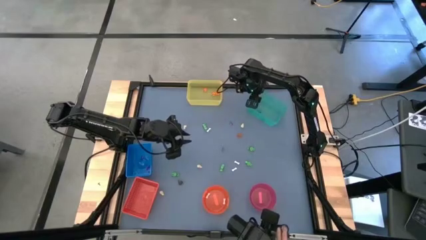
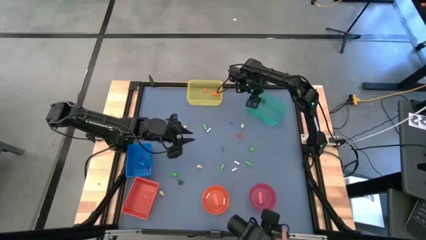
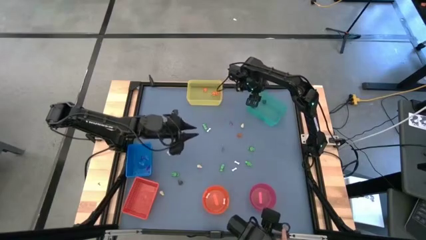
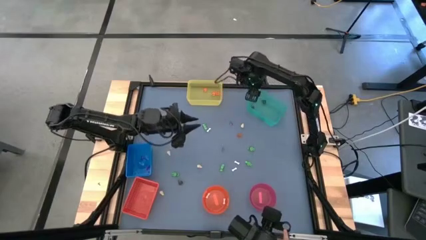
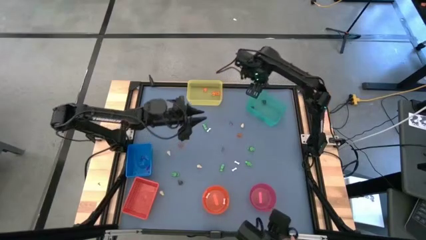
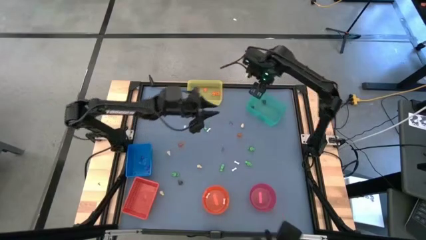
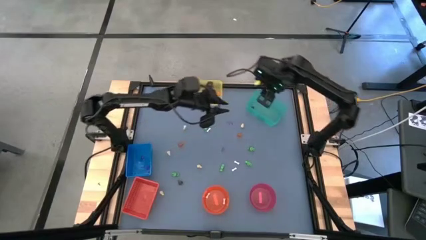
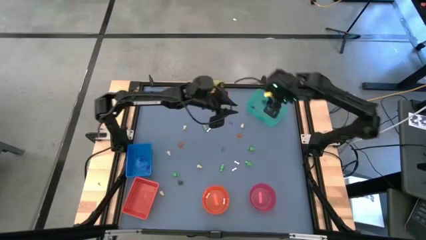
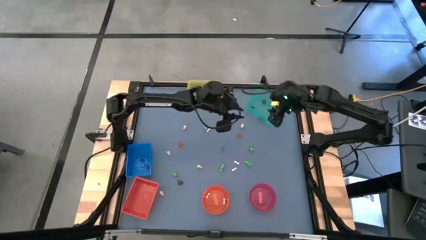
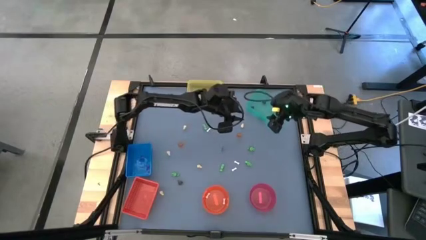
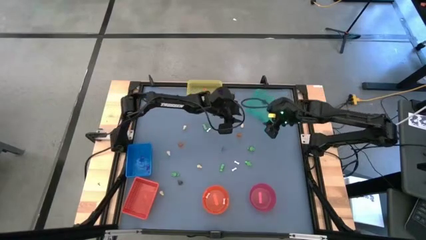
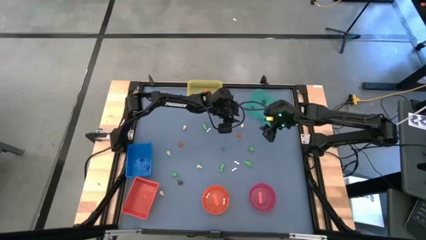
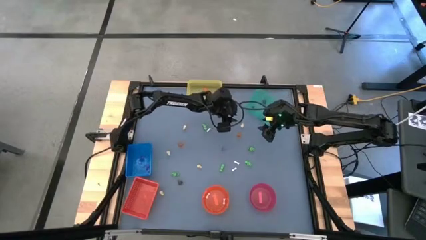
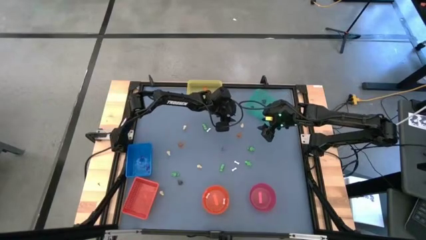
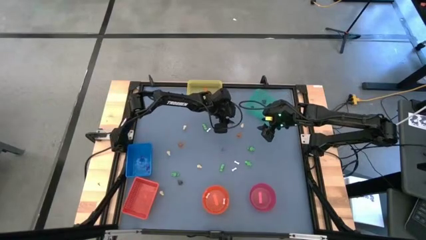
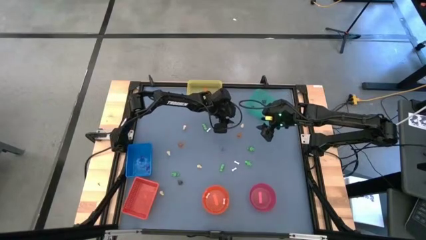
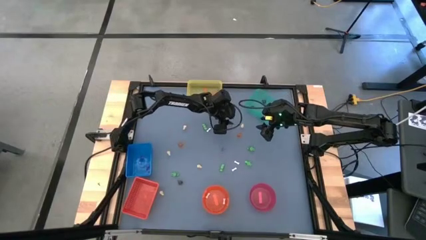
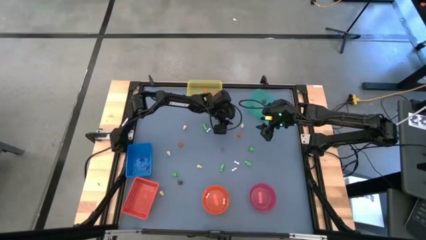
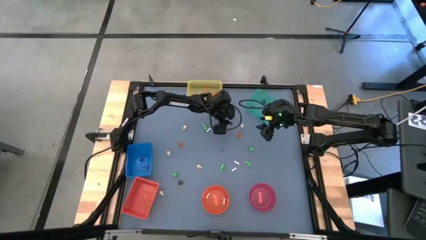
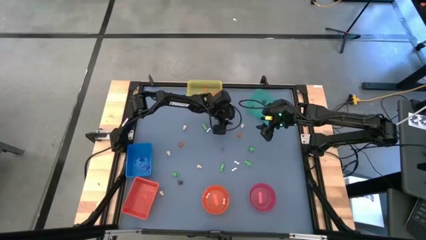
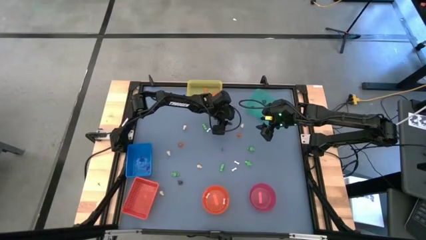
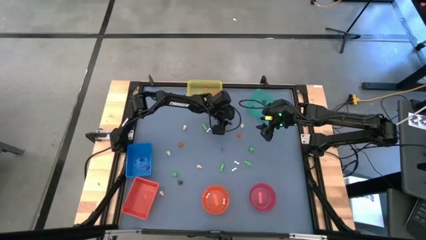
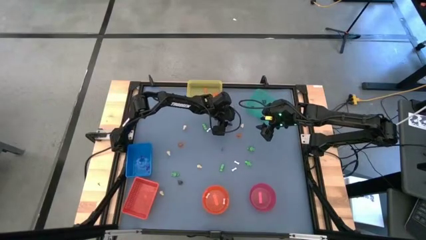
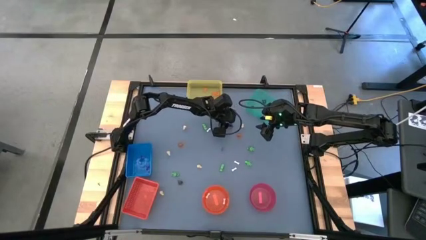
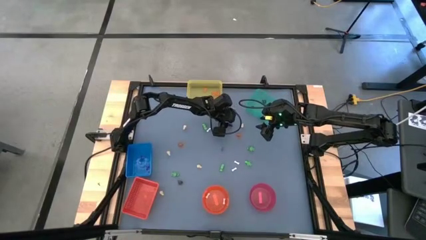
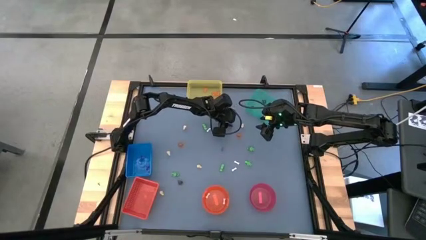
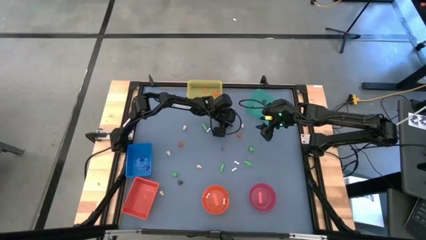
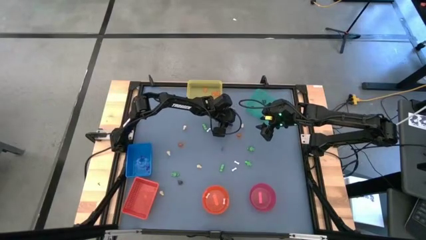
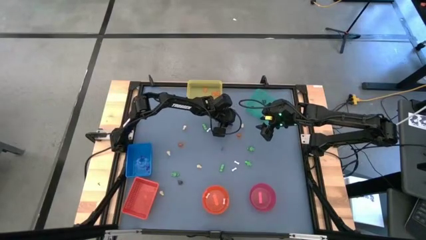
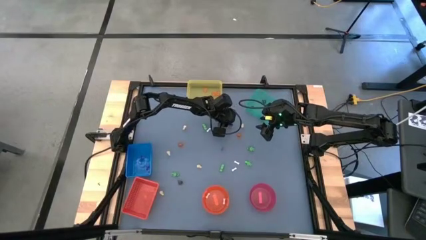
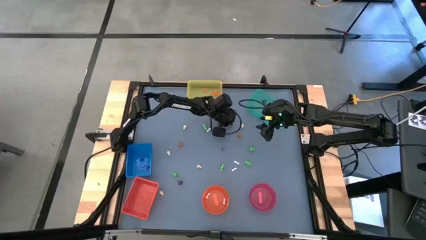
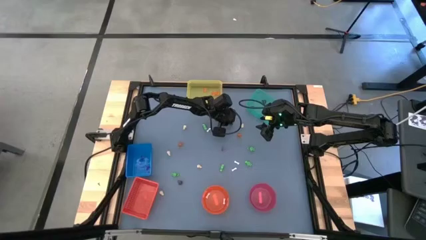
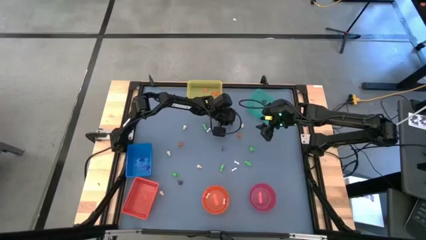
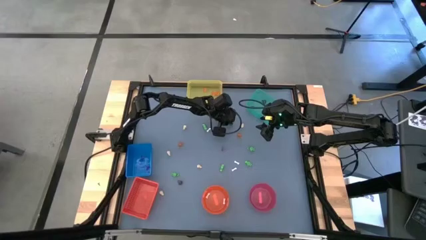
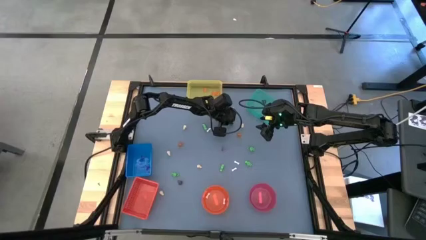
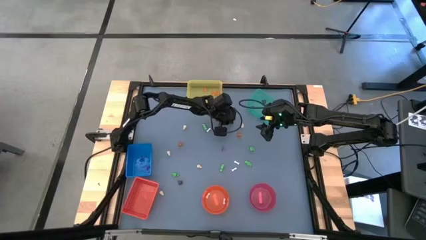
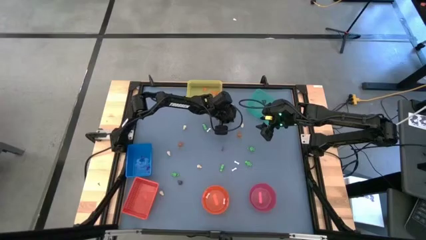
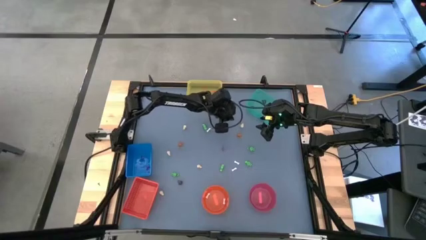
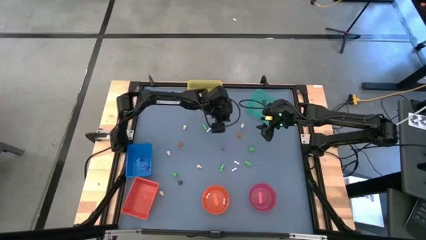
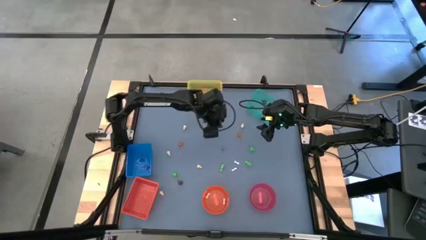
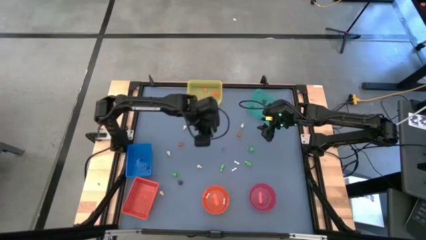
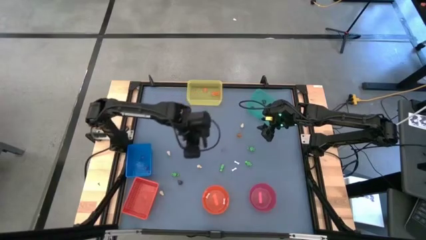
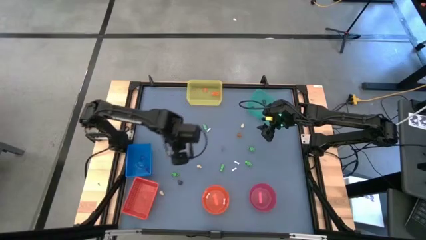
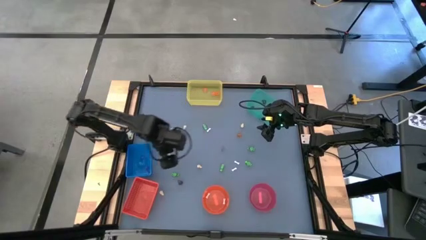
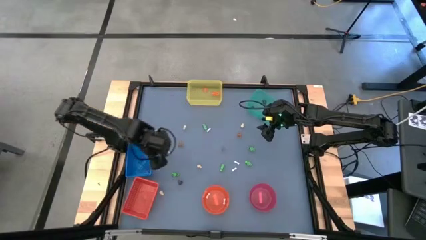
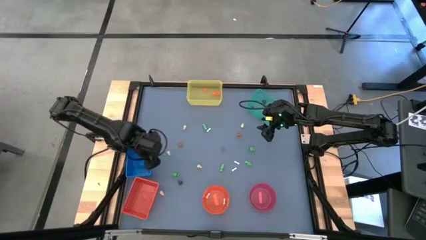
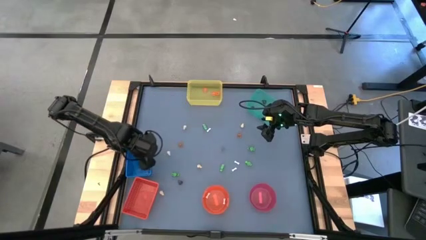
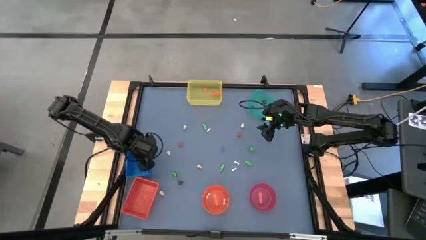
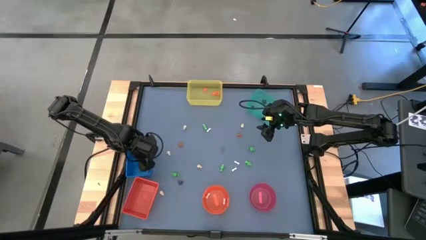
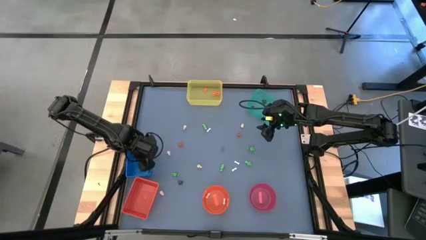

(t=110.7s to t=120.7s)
Task: Sort Halloween decoration
Put the purple witch hat toy into the blue bin

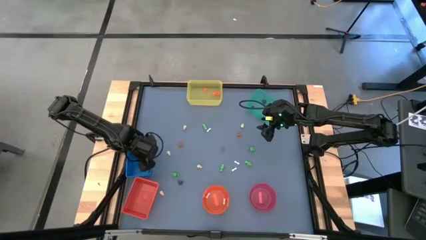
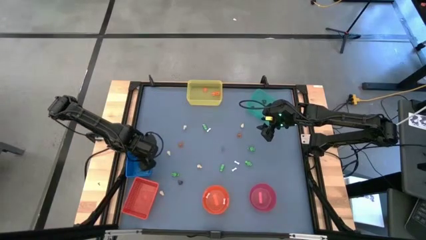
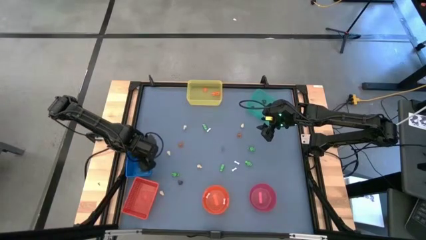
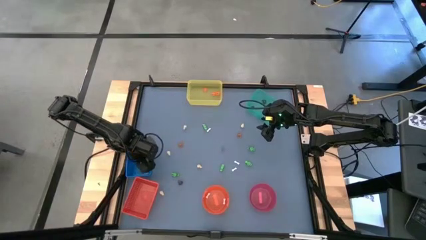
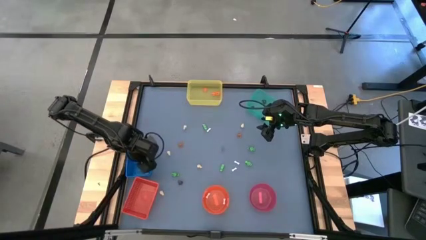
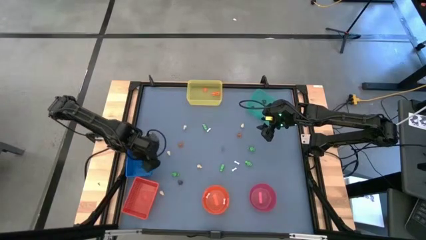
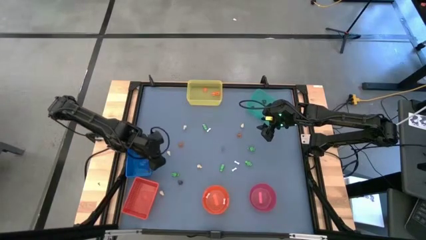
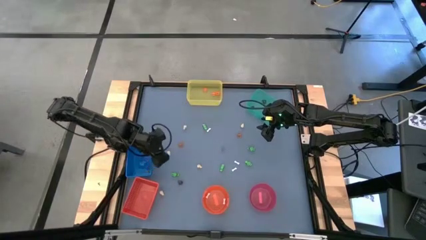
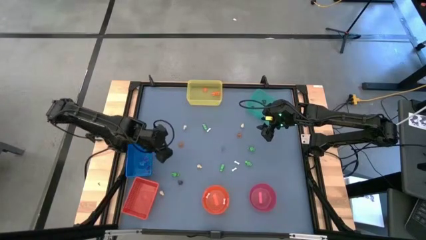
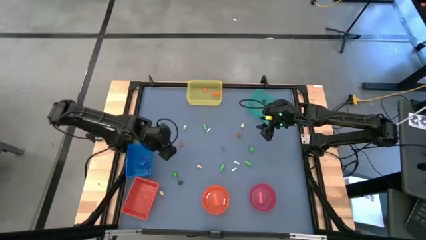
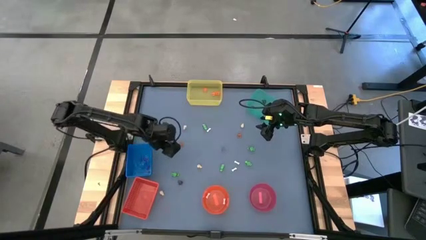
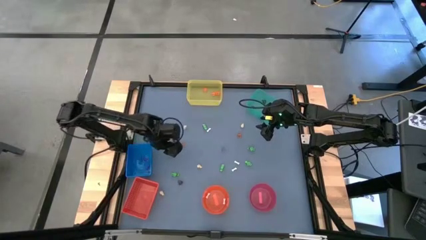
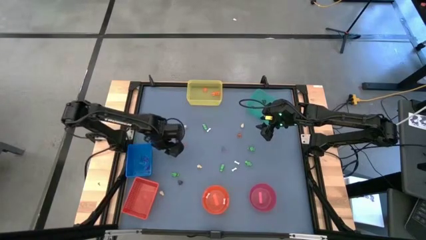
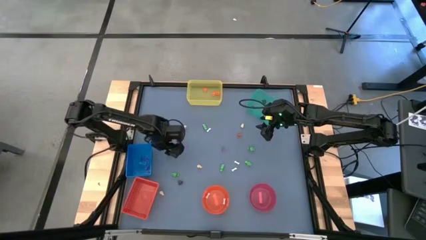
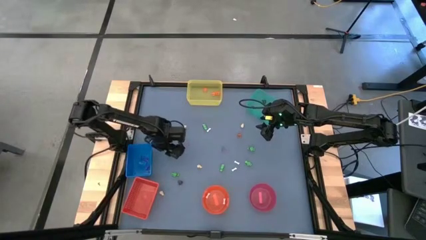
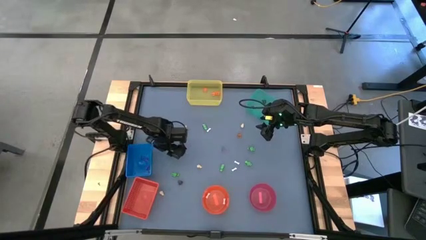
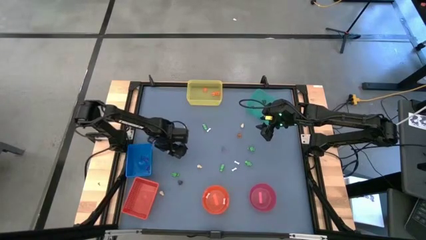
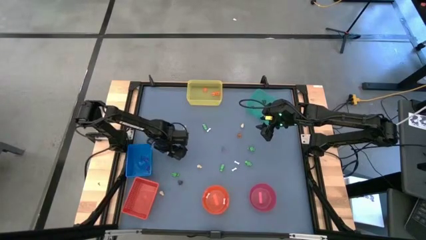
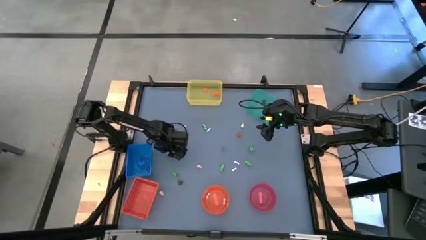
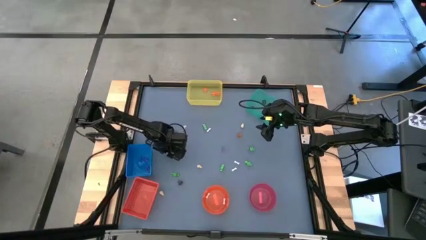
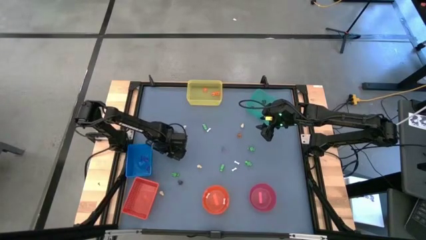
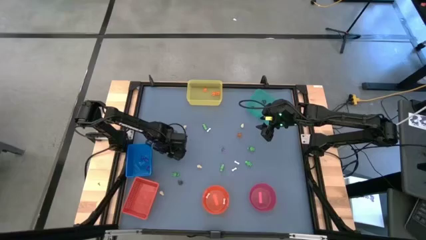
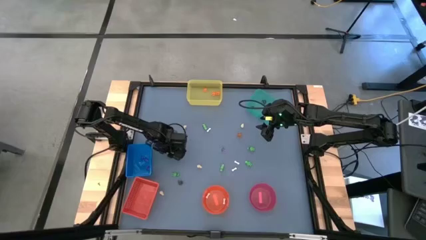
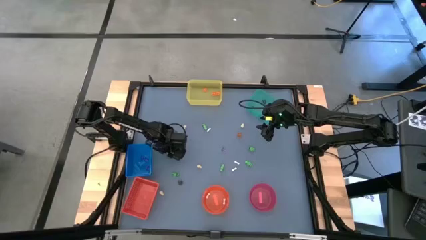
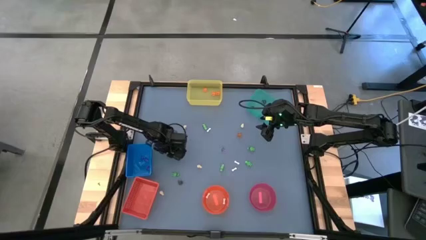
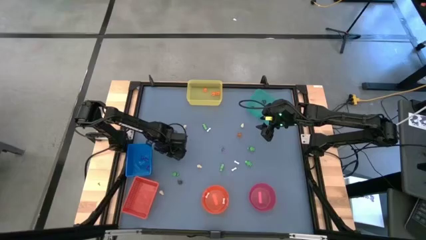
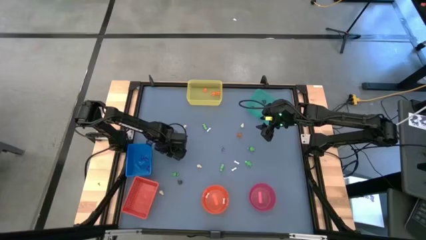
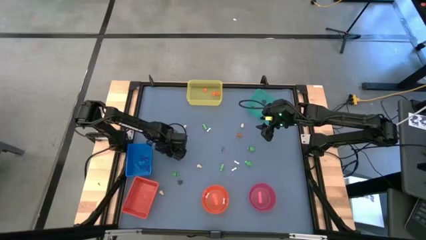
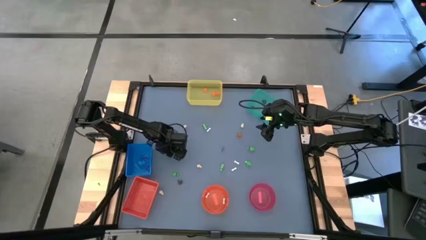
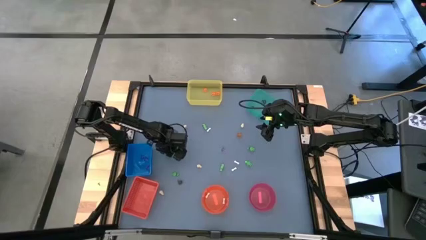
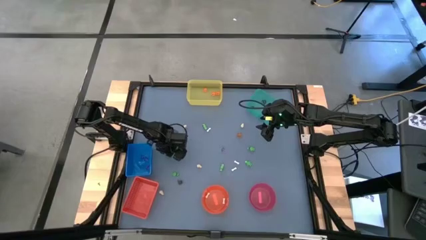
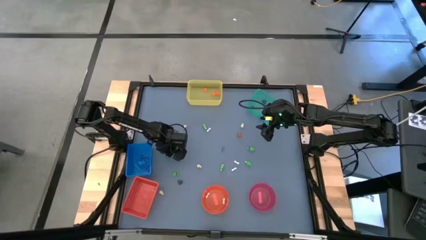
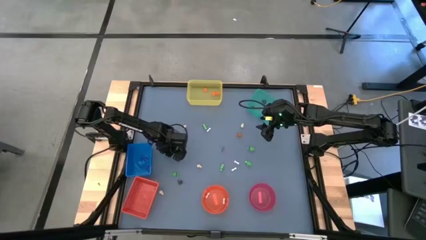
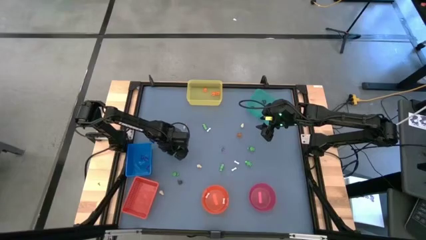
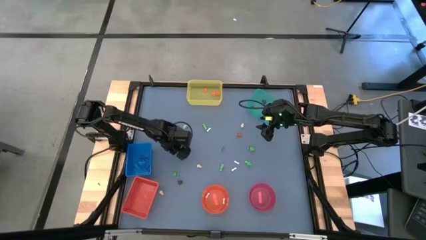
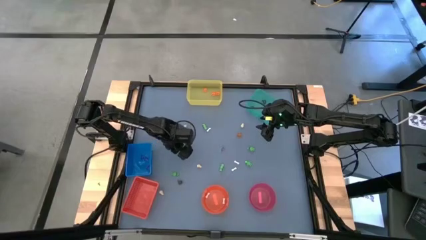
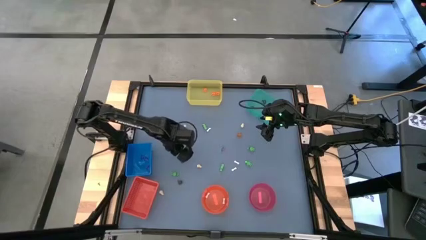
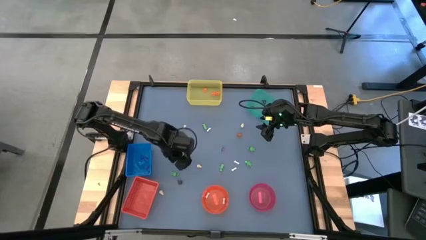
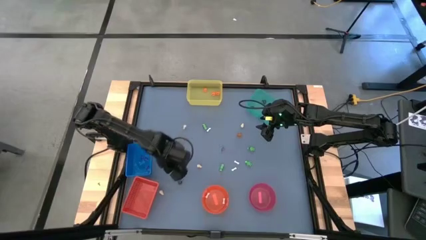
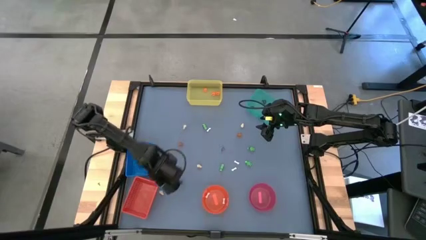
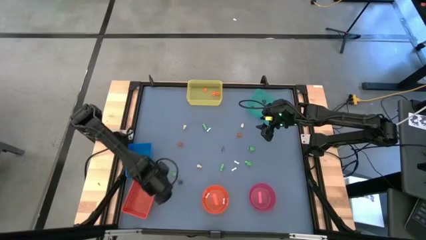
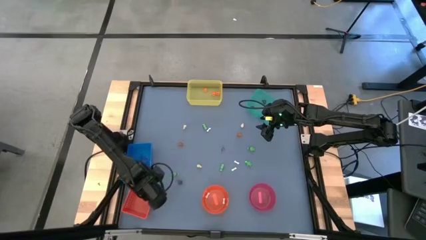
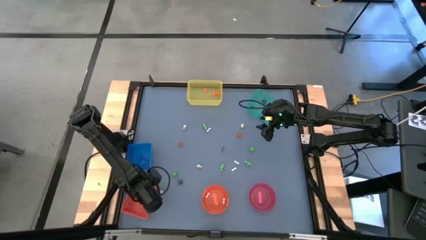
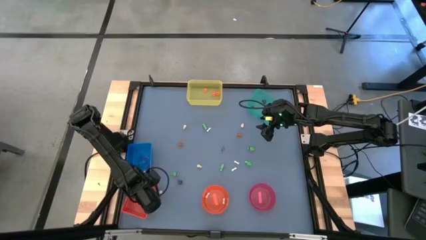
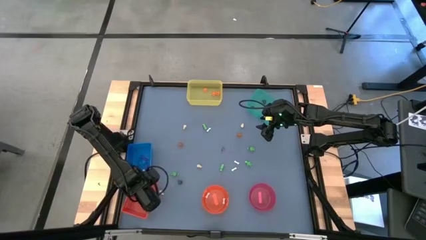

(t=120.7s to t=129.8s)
Put the brown skull toy into the red bin
